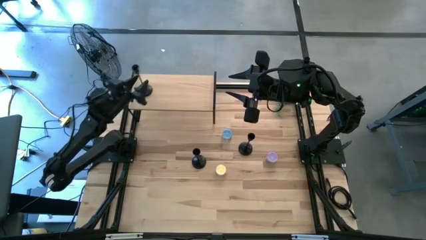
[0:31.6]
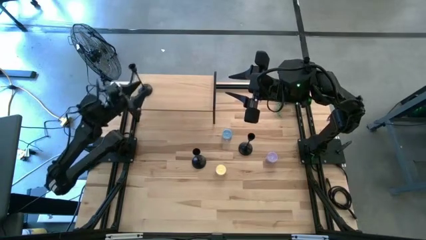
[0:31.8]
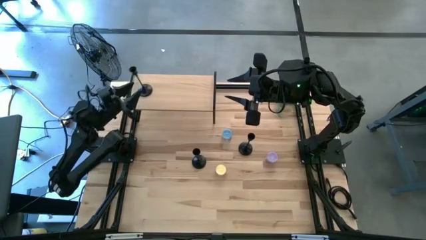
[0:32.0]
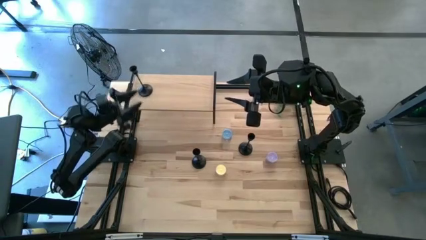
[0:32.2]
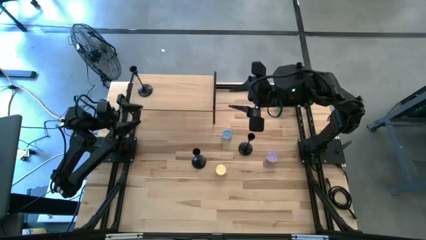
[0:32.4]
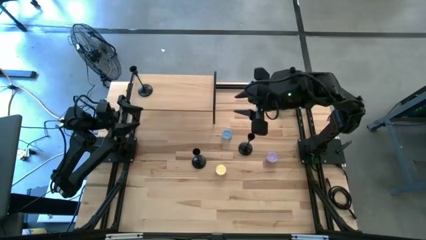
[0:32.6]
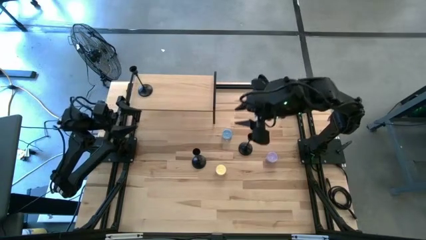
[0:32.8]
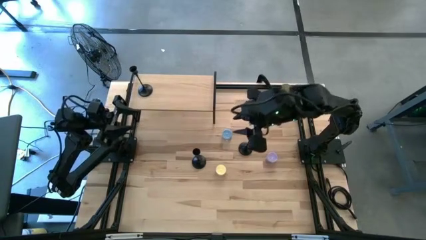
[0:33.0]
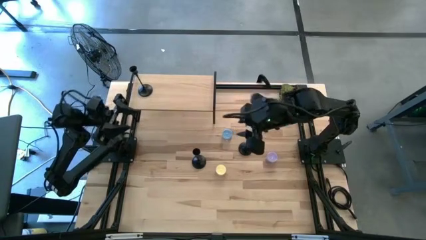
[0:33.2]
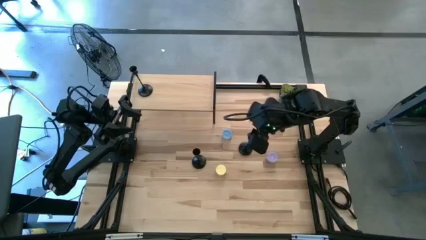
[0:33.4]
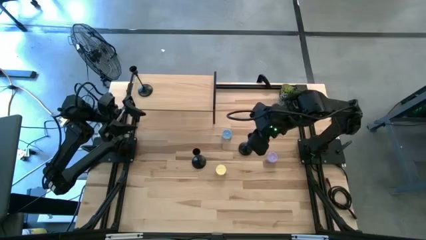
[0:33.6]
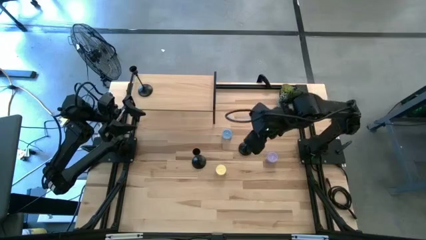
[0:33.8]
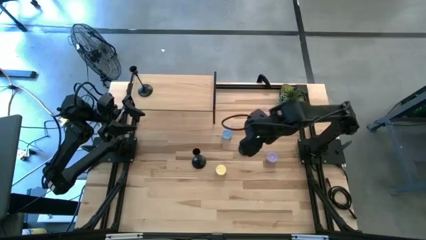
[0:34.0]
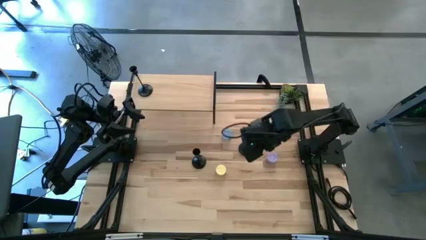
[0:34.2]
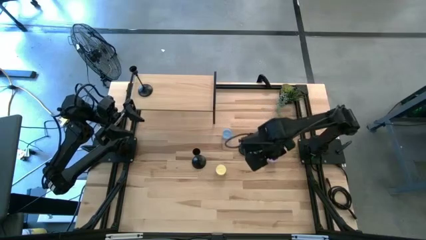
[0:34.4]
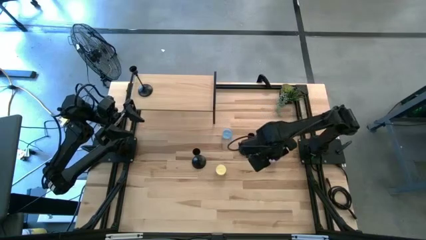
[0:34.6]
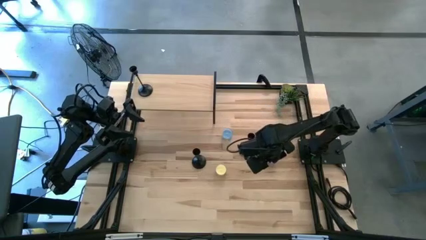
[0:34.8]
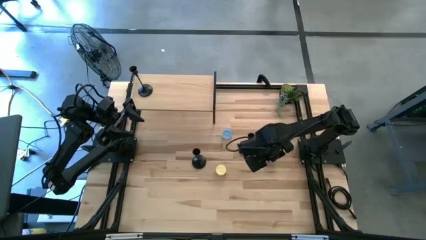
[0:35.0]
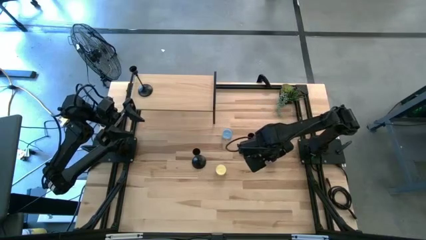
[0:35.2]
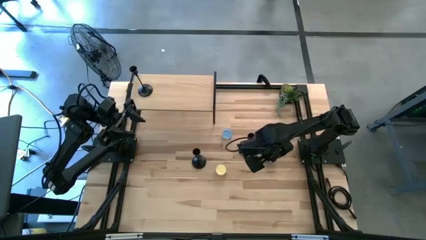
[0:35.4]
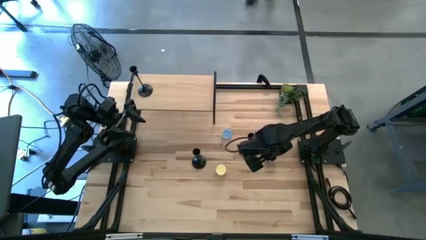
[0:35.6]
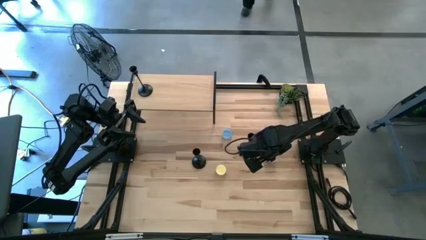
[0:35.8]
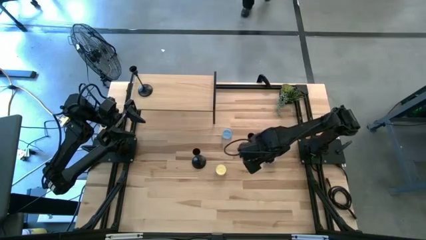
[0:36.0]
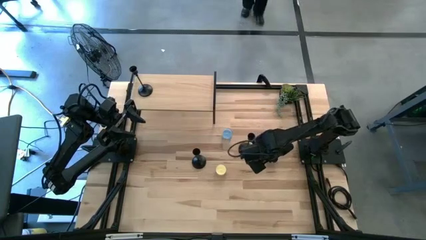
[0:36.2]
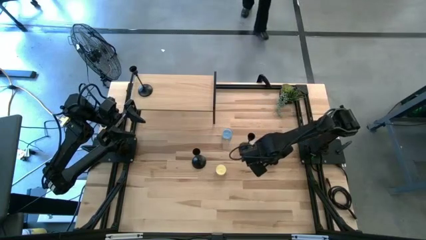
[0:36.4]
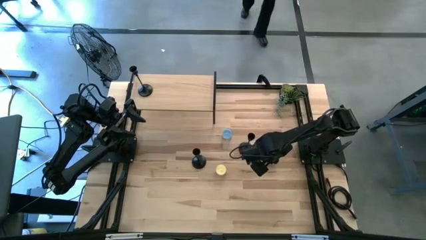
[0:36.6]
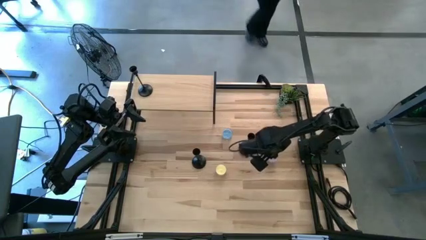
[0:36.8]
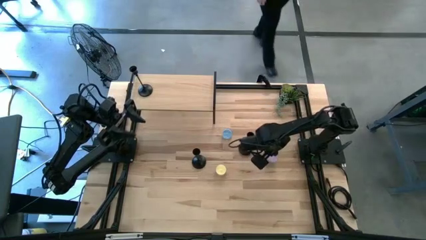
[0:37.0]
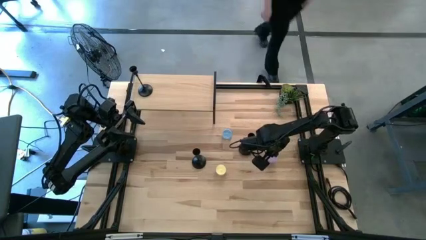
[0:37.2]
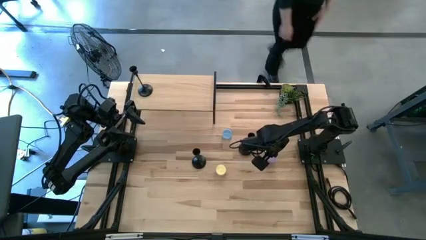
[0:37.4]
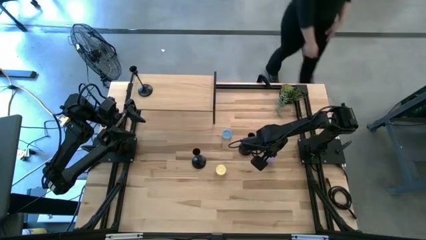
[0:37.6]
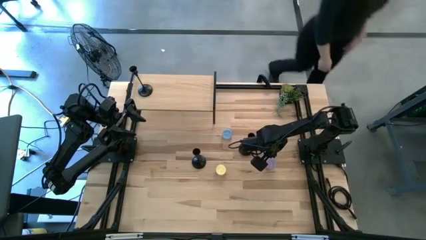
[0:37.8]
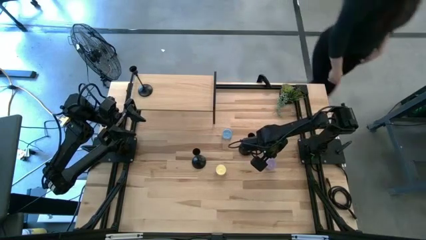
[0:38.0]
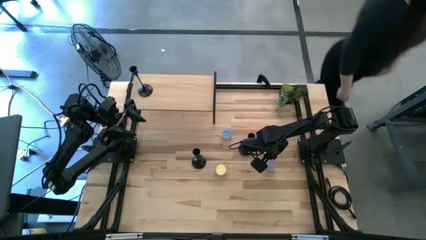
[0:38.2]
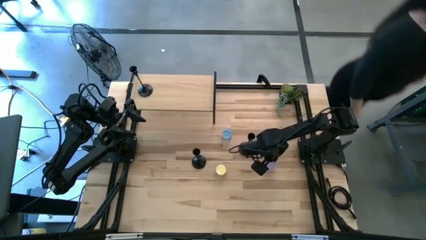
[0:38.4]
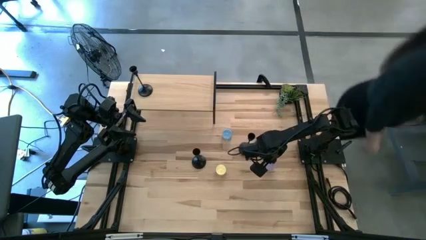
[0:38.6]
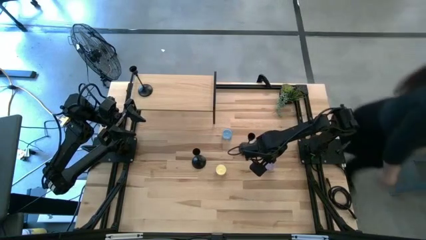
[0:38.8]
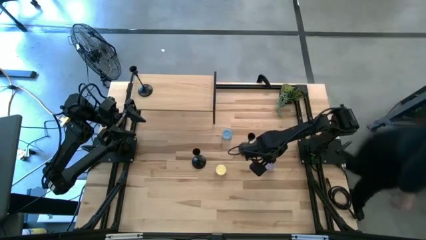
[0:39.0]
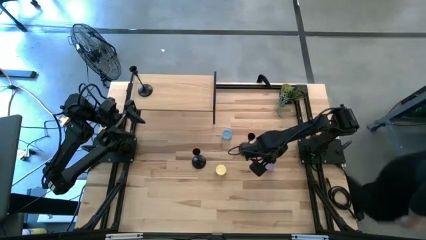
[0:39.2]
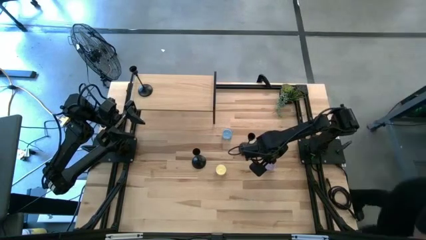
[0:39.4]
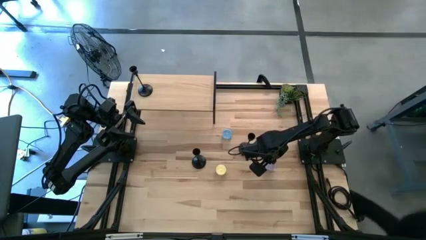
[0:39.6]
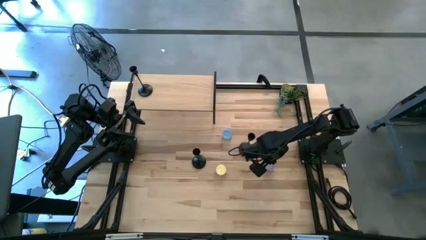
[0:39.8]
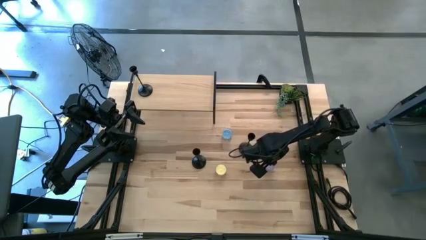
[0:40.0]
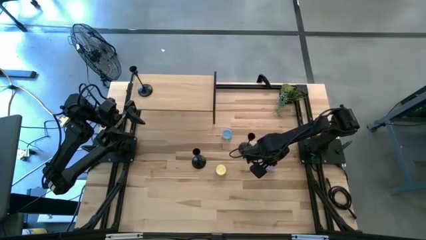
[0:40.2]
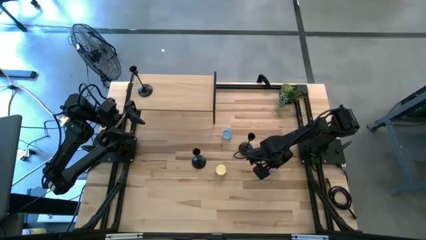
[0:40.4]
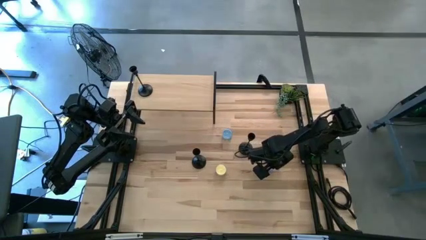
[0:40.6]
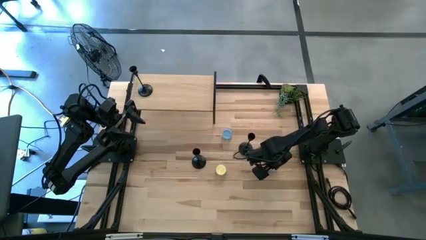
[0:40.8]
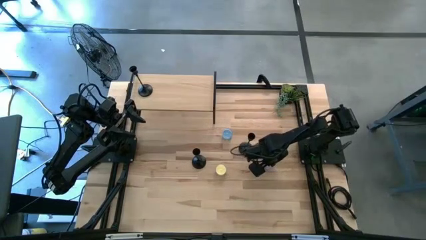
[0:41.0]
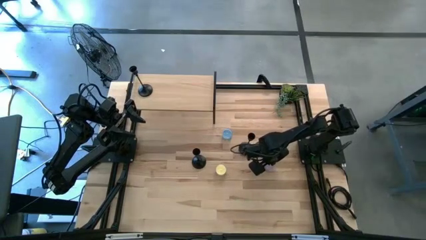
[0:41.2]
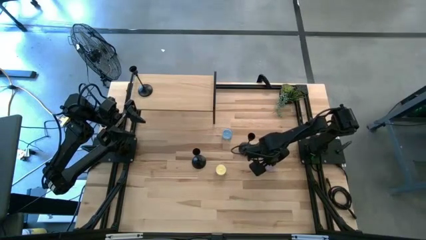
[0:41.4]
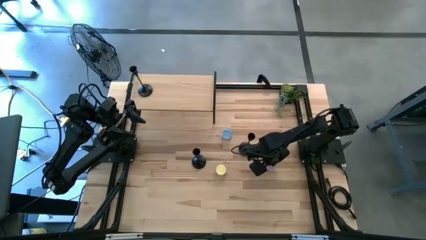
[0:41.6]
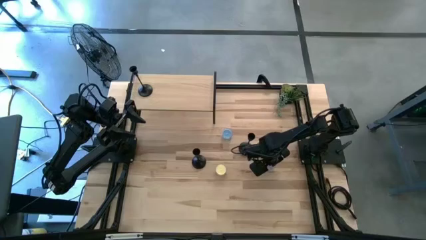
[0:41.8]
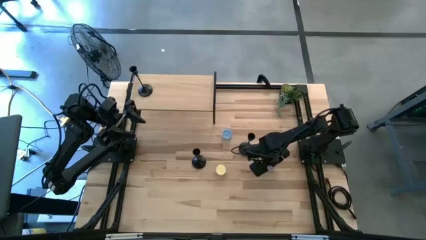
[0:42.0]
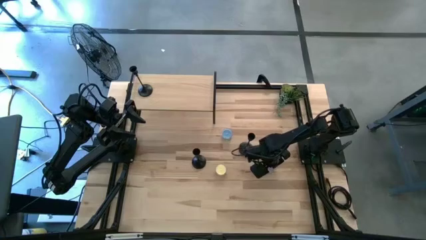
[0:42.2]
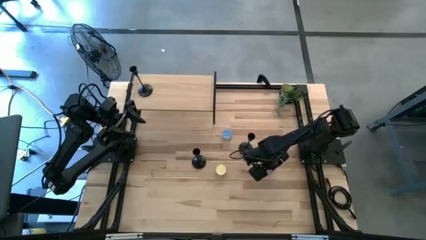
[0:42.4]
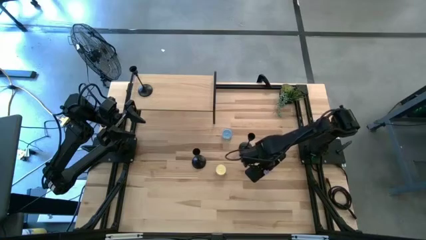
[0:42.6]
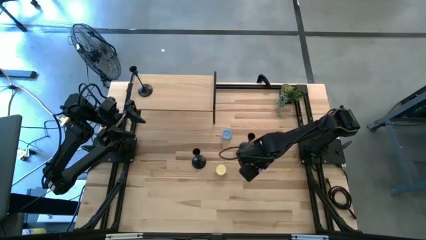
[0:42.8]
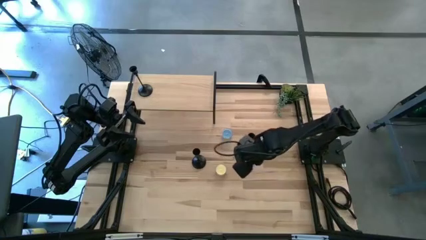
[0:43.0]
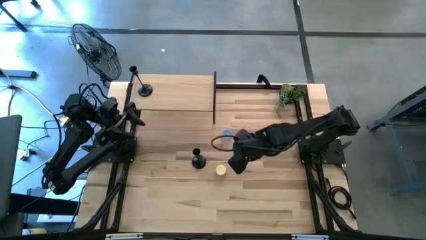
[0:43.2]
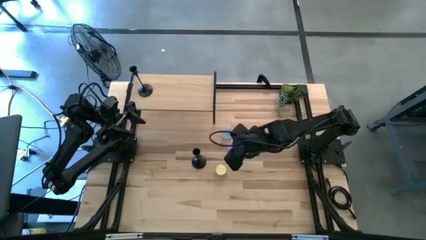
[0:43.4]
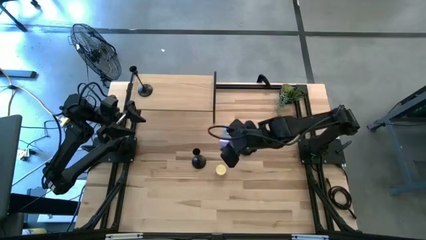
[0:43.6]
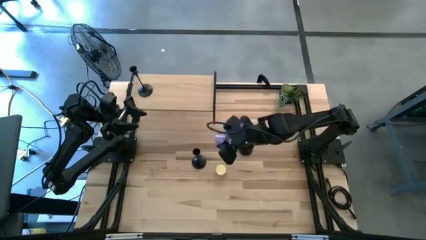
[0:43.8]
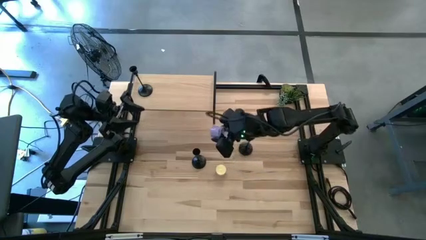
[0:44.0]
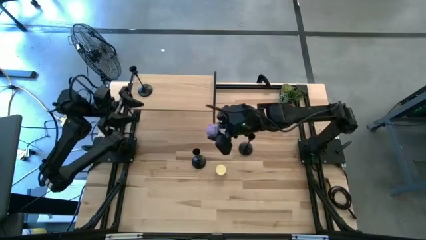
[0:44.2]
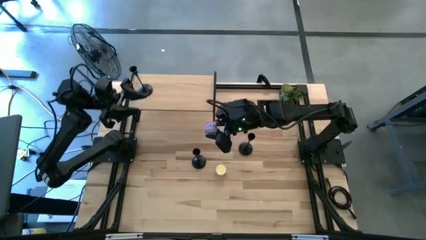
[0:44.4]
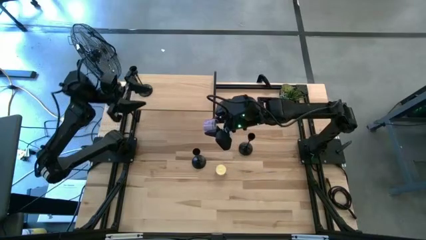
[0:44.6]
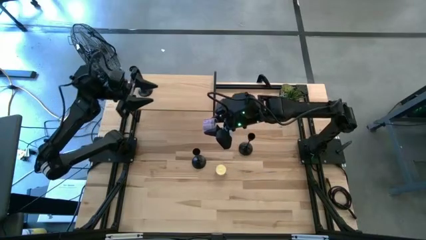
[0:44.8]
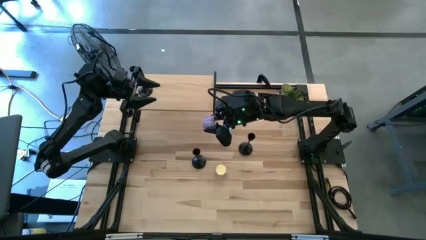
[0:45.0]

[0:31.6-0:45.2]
Task: Pick & Place candle stick holders
Put the purple candle on the shelf

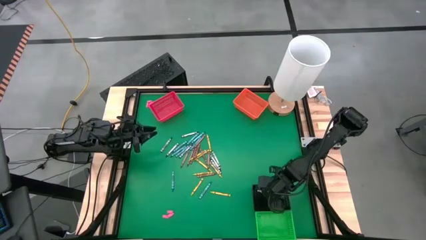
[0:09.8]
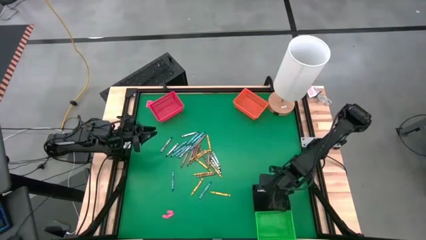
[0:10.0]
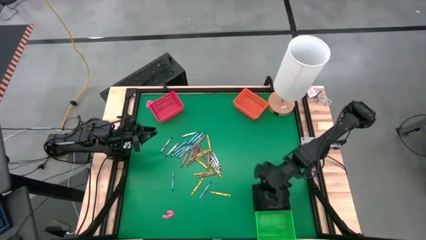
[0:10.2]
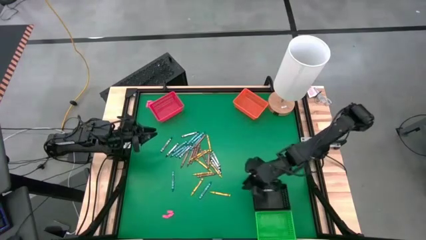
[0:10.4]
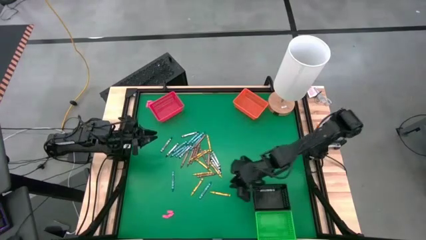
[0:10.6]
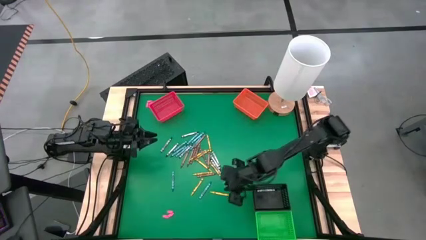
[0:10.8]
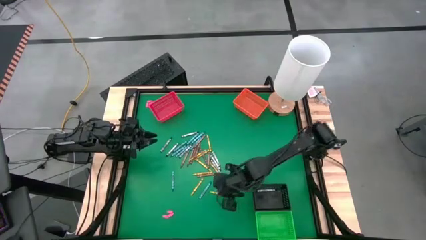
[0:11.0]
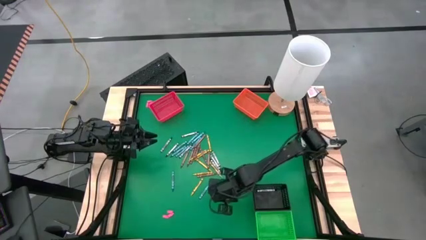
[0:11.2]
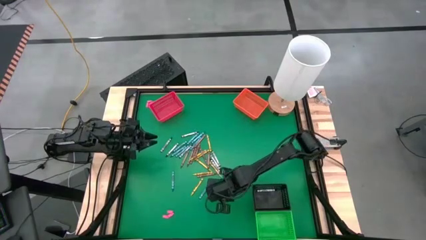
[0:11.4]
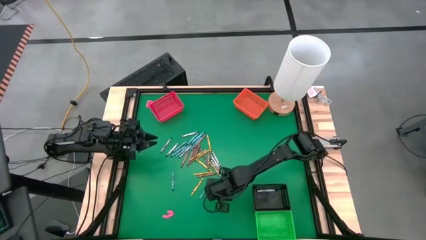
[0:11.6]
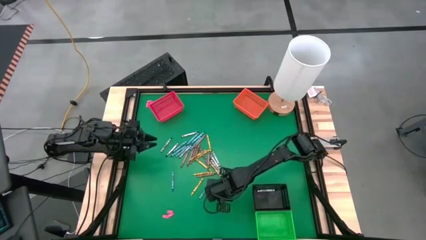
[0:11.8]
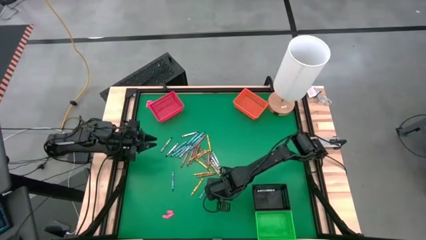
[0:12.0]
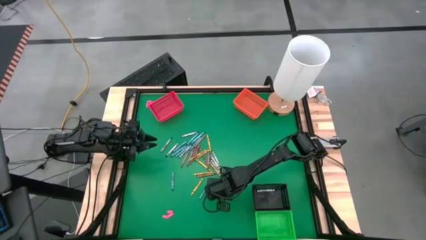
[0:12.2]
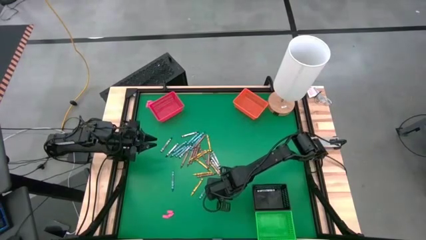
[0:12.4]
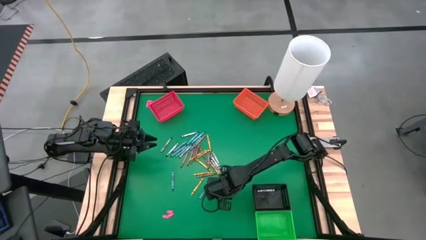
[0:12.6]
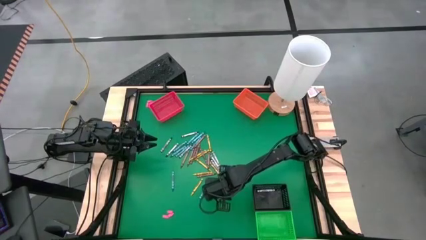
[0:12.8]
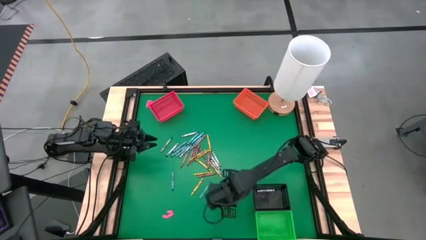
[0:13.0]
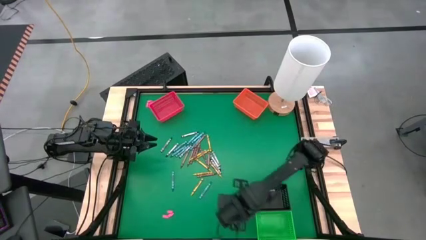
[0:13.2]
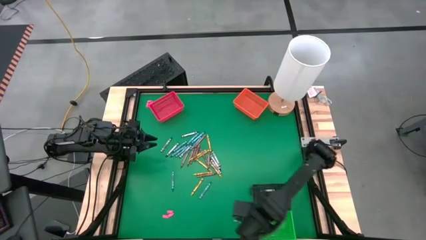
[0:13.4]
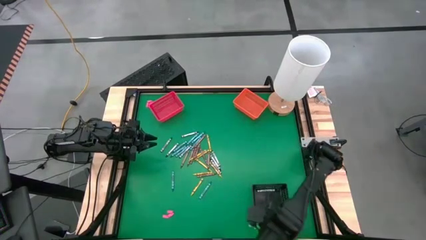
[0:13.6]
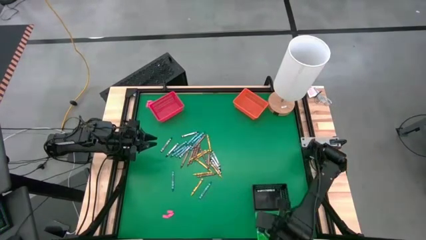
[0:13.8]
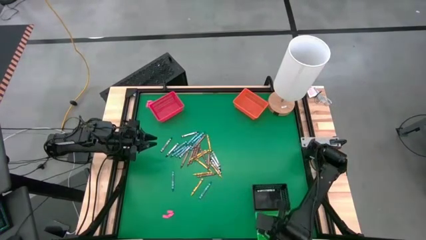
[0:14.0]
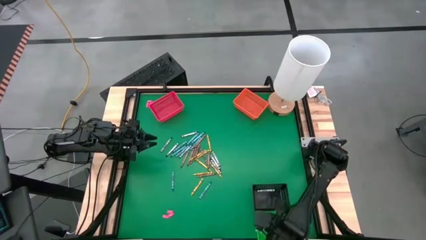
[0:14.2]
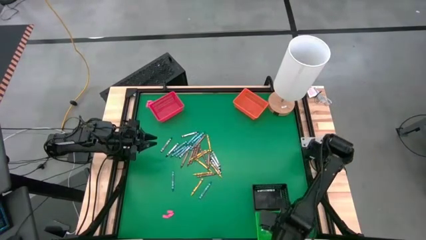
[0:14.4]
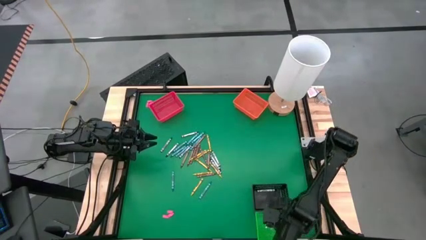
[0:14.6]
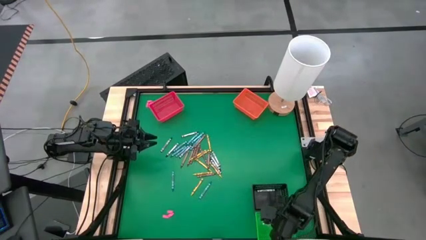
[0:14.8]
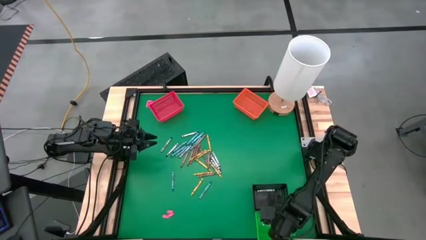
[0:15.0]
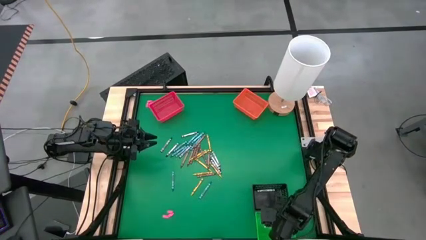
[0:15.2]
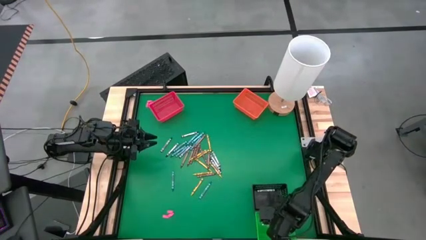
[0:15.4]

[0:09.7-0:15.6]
Task: Sort crayons
Put the yellow crayon into the green bin
